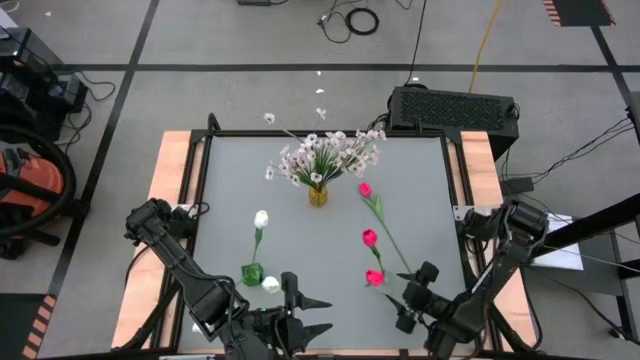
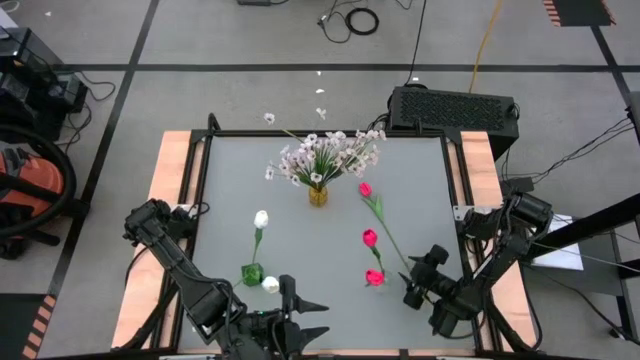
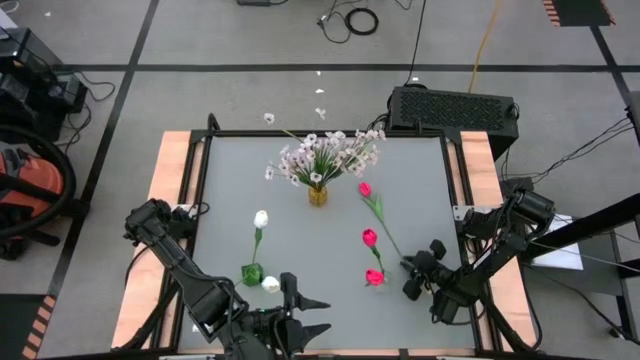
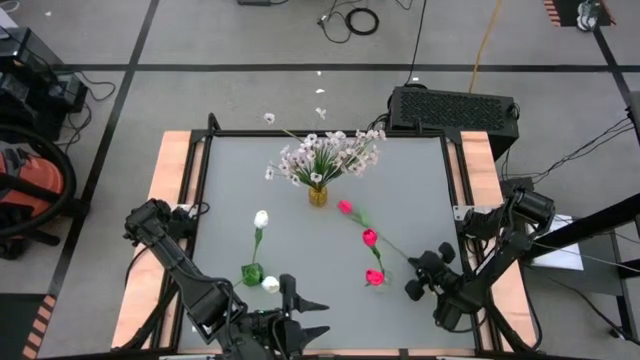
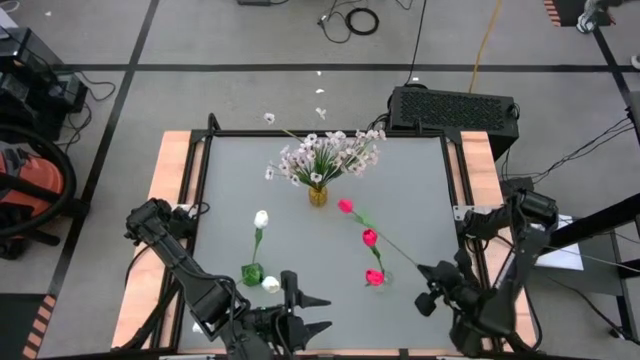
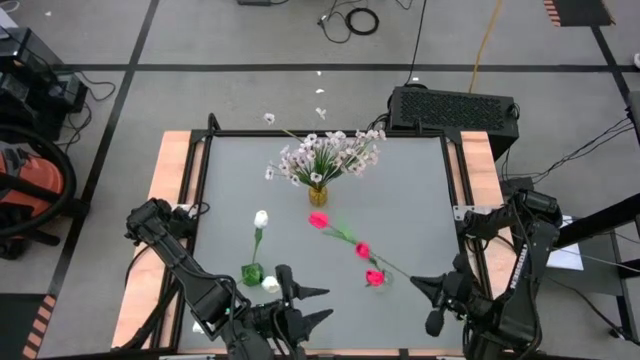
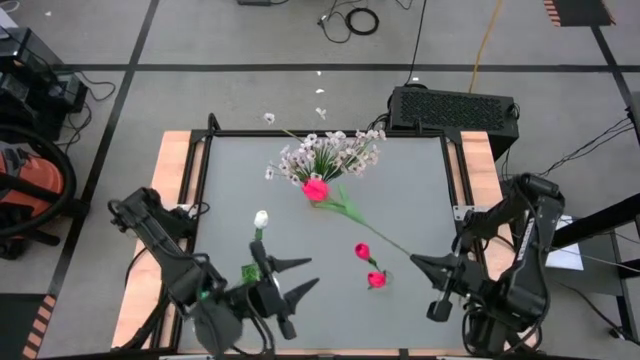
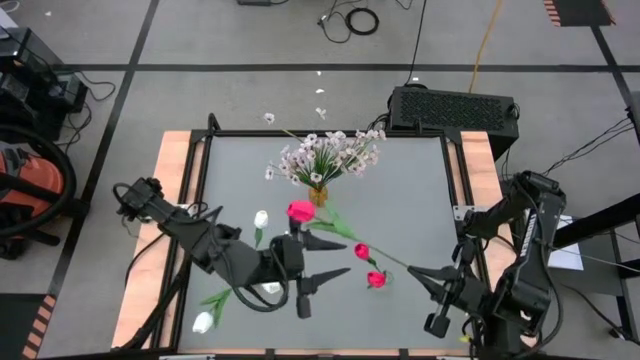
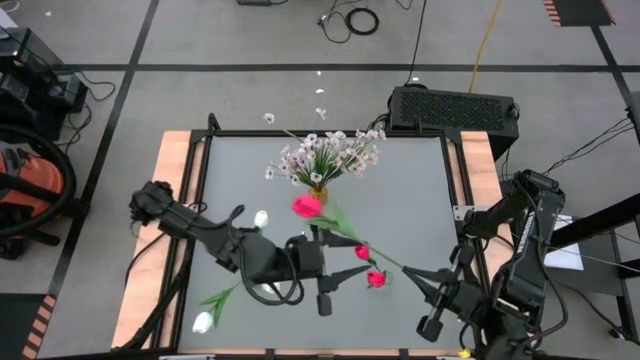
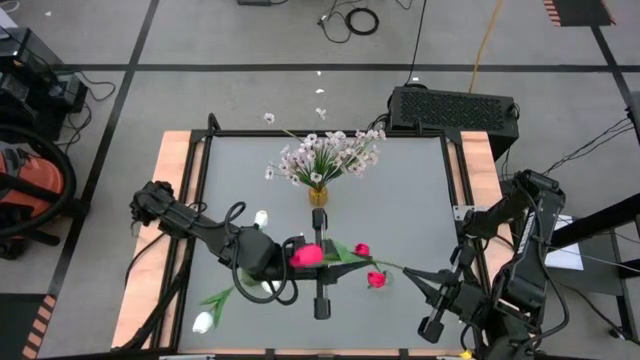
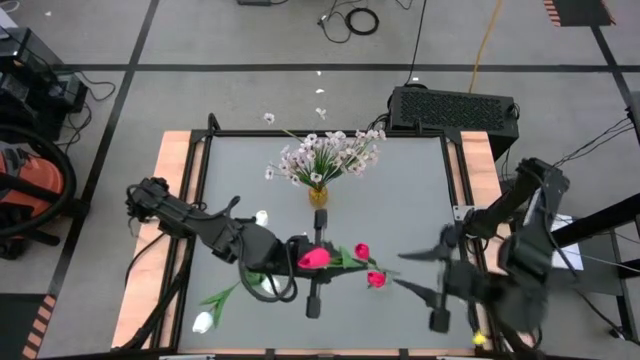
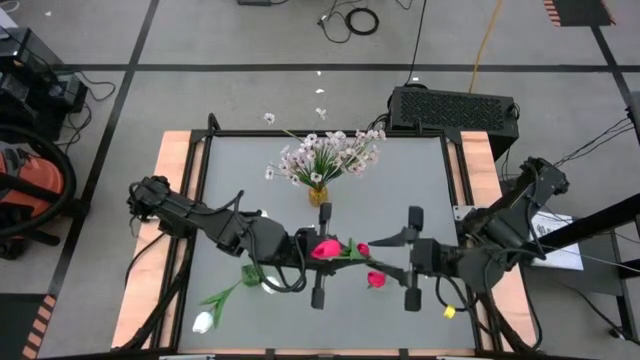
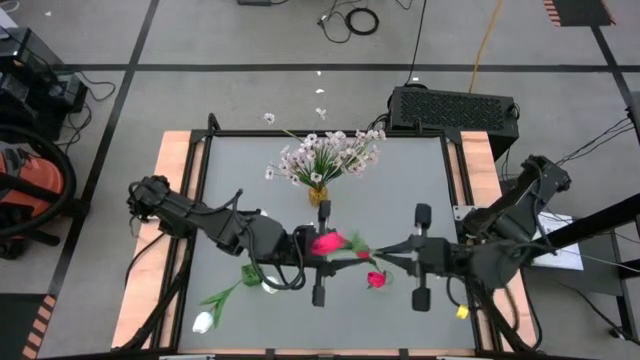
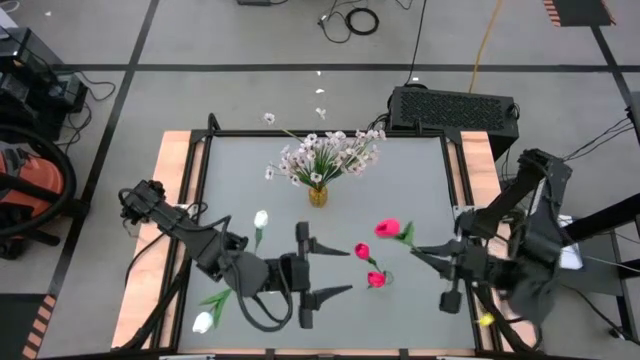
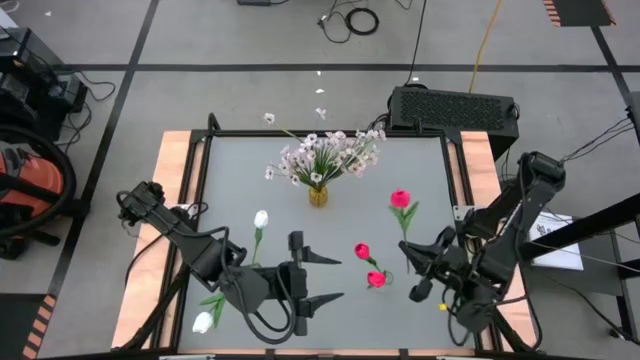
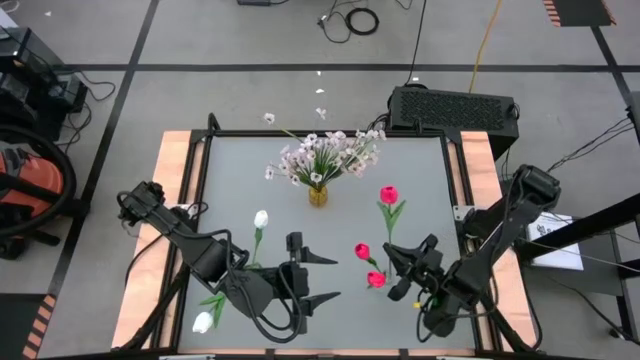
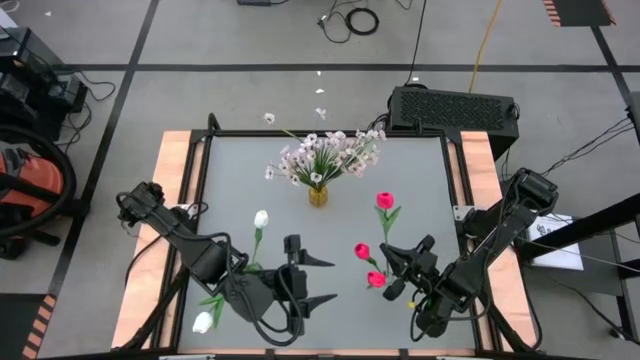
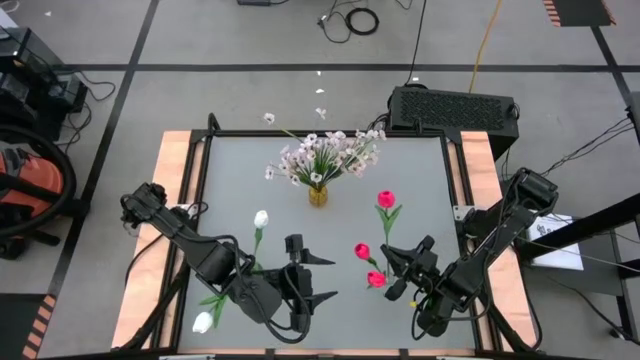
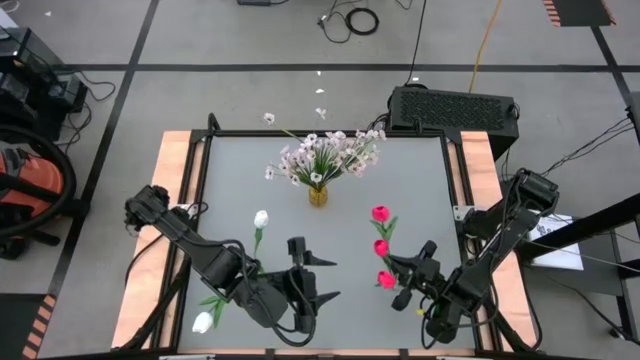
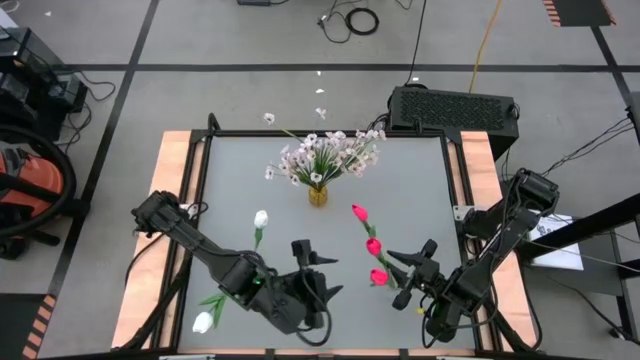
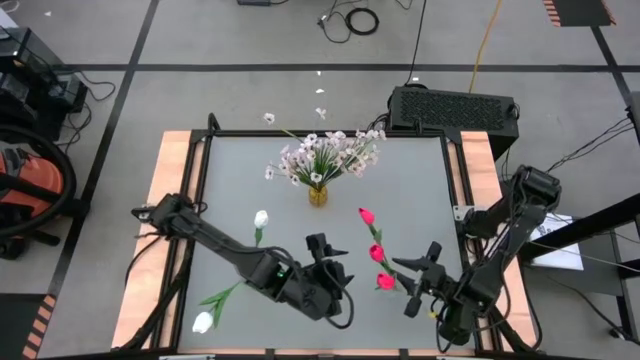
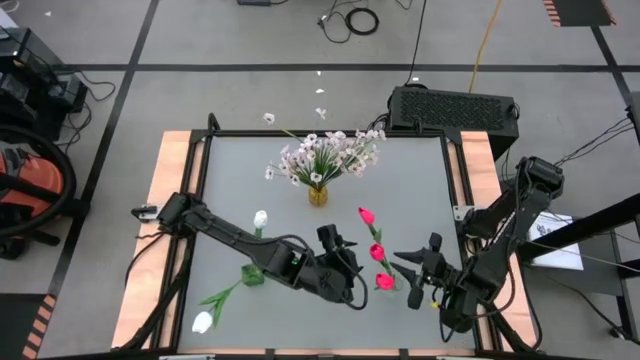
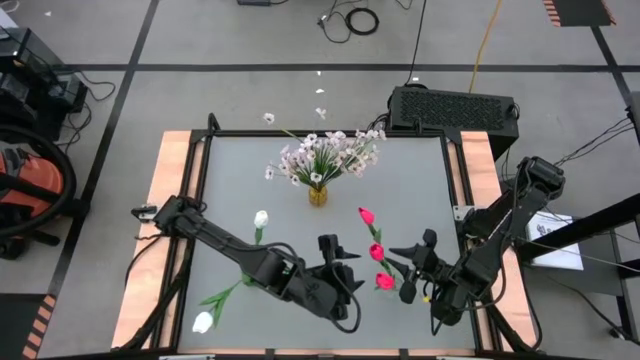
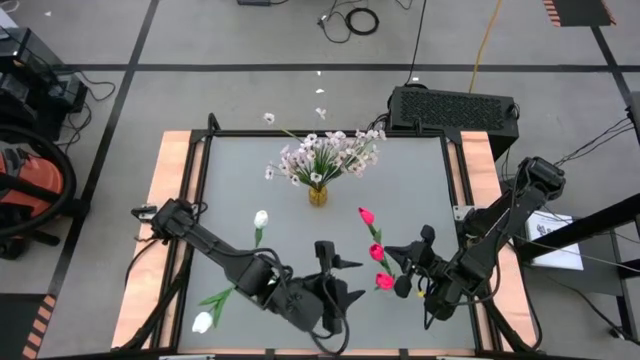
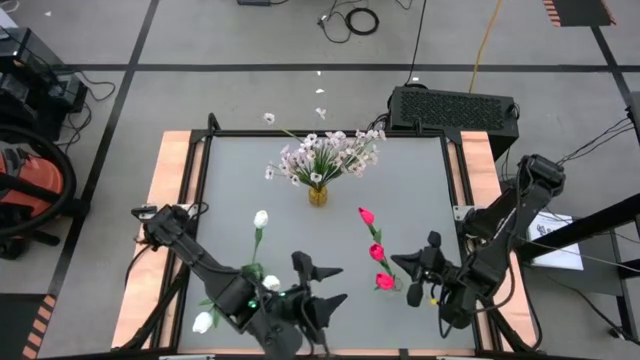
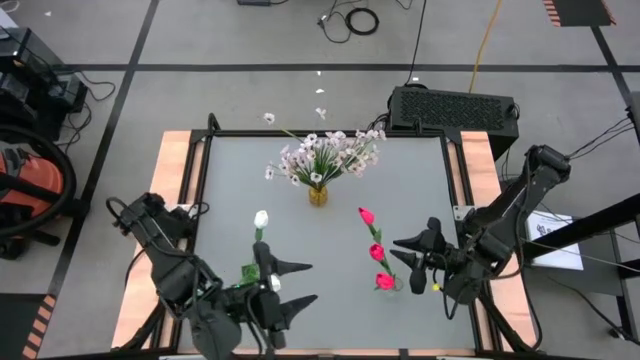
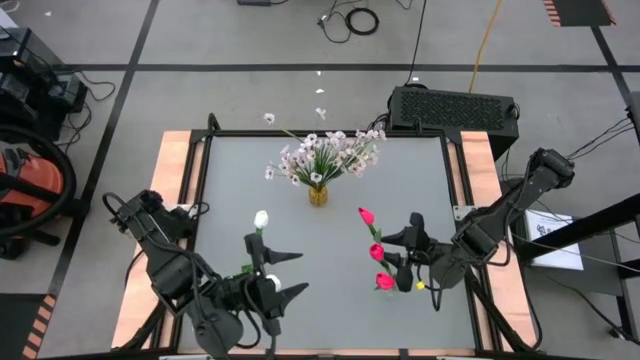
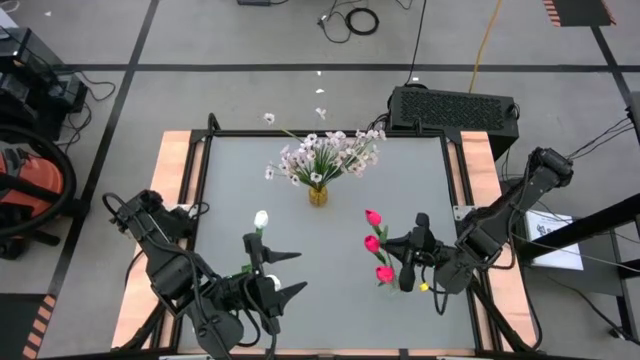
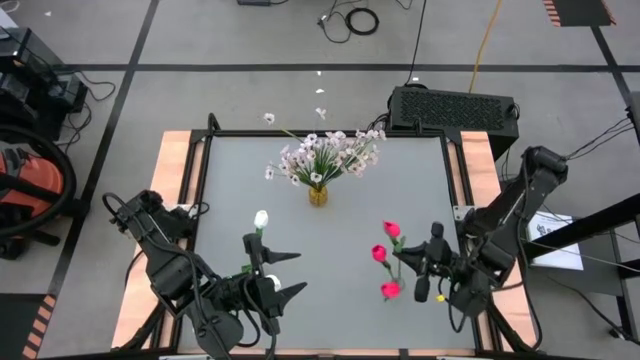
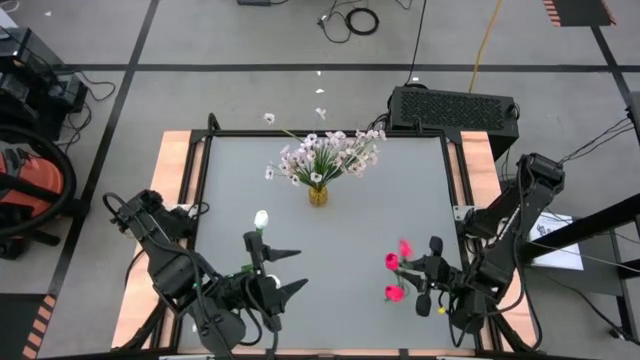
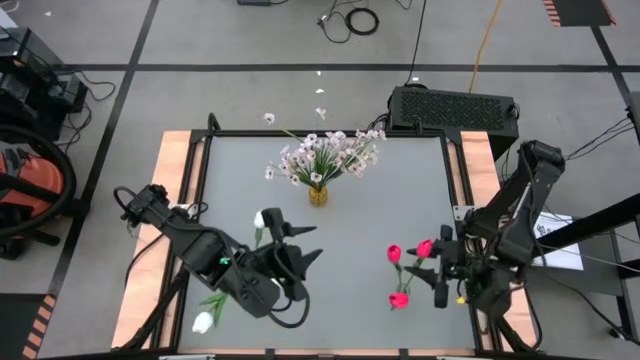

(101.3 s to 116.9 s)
Task: Sort flowers into vase by color
Put the red flower into the transparent vase

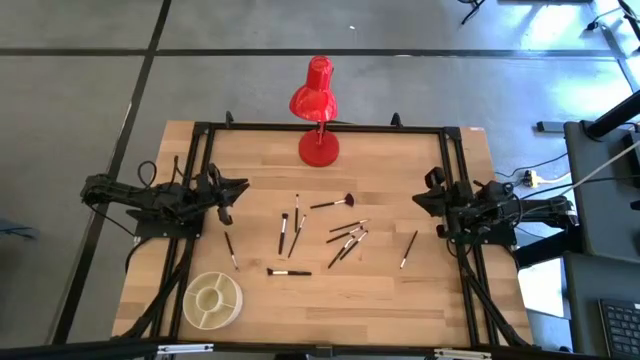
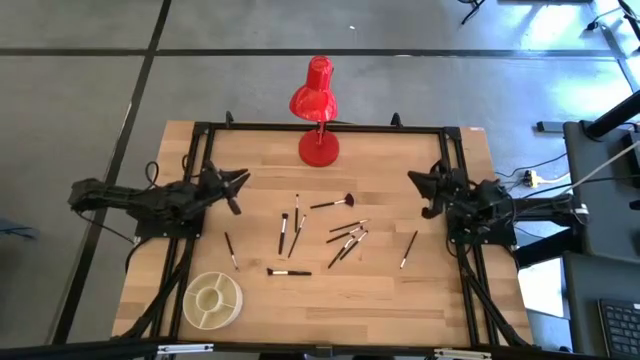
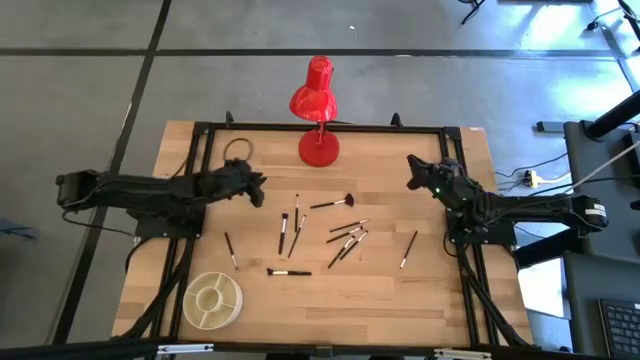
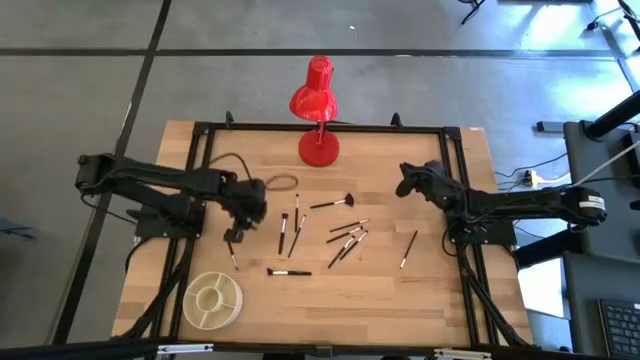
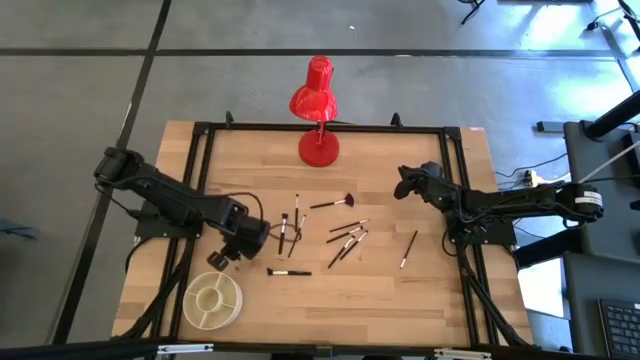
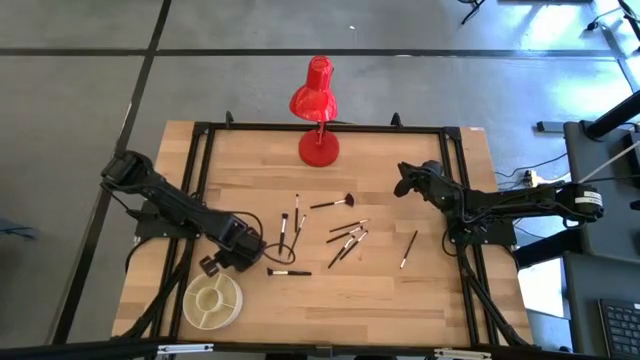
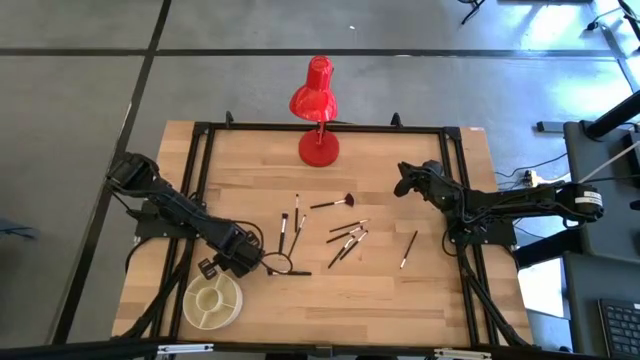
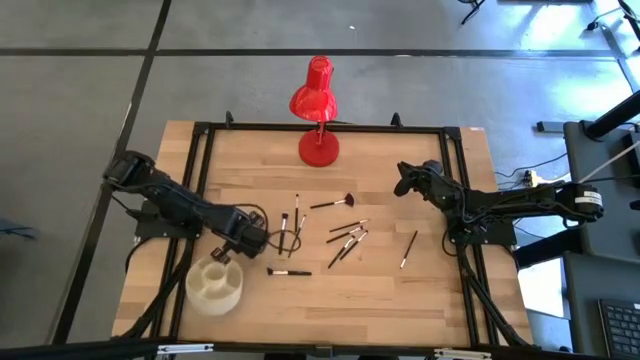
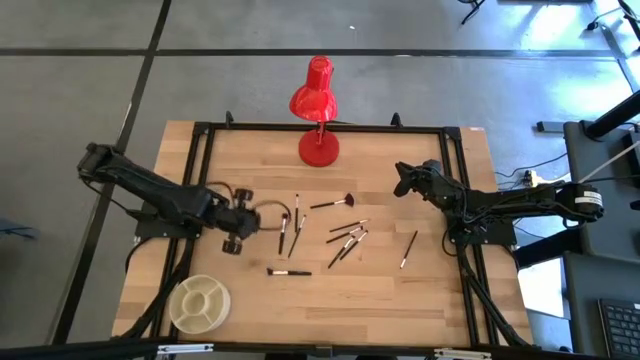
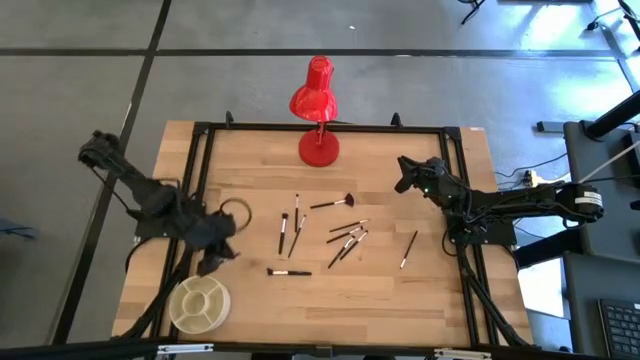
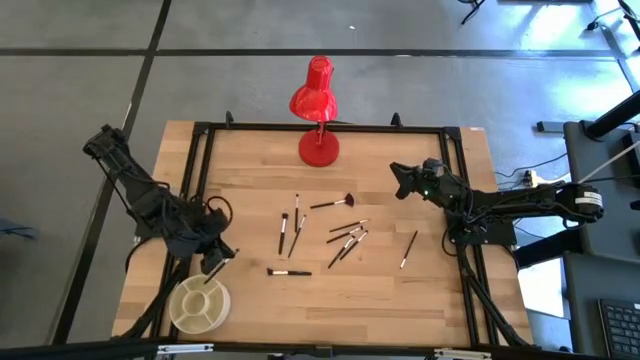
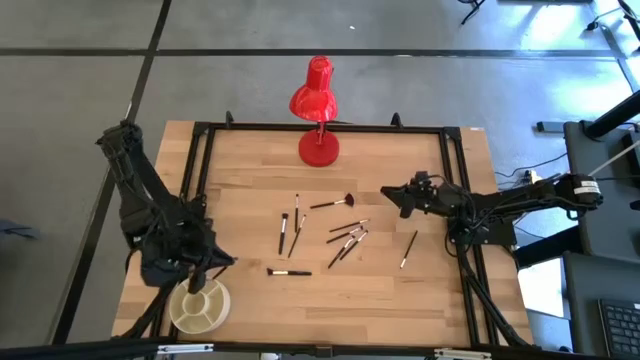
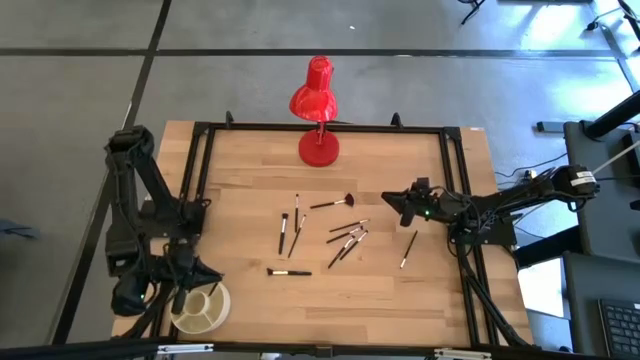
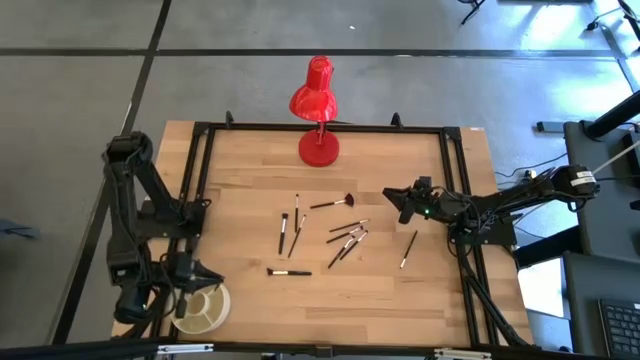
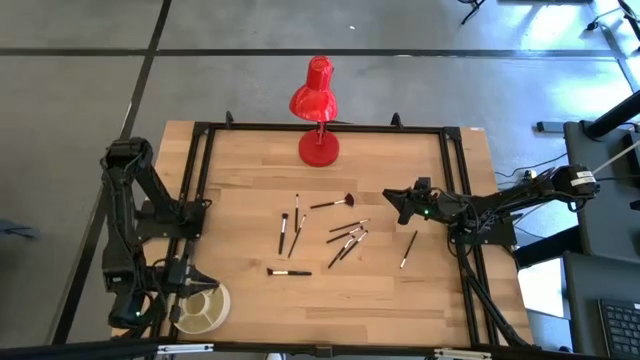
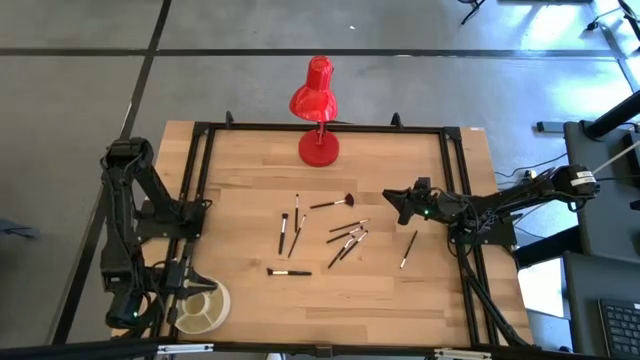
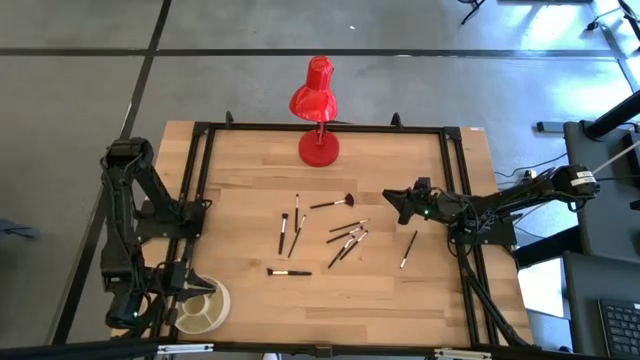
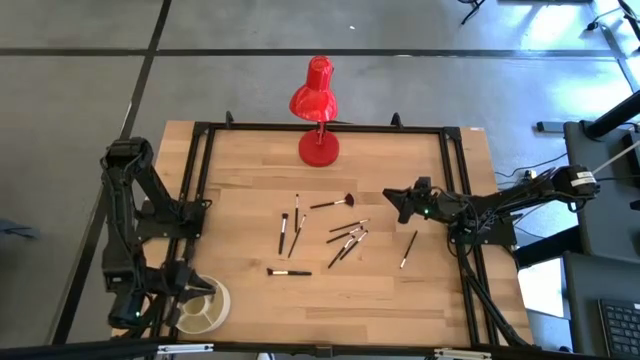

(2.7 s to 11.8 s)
Task: Put items in baskets/containers
Put the eyeshadow brush into the pen organizer
